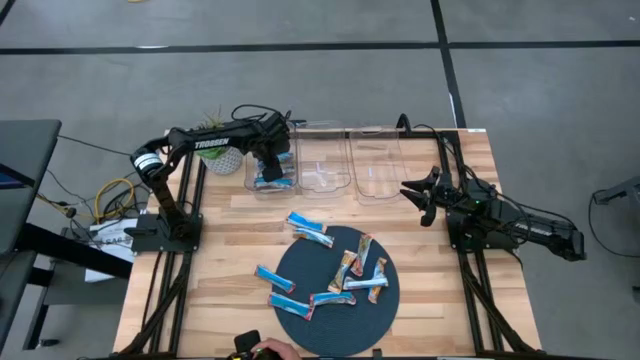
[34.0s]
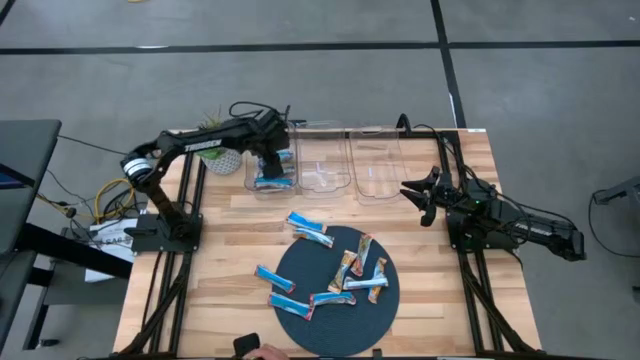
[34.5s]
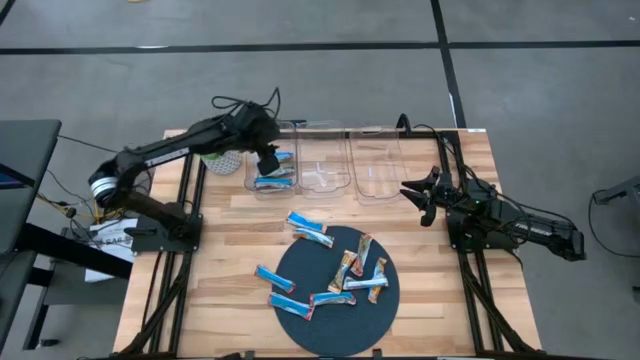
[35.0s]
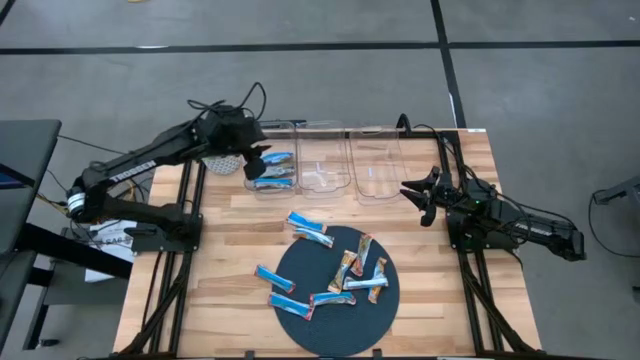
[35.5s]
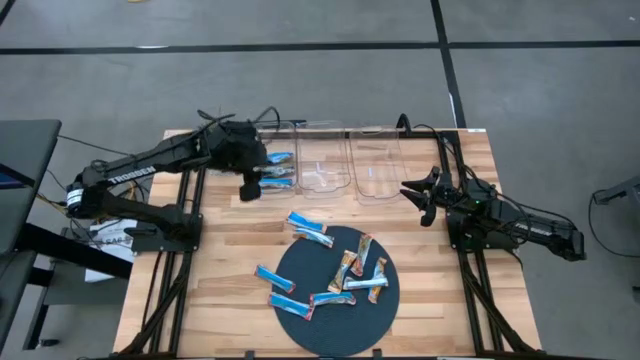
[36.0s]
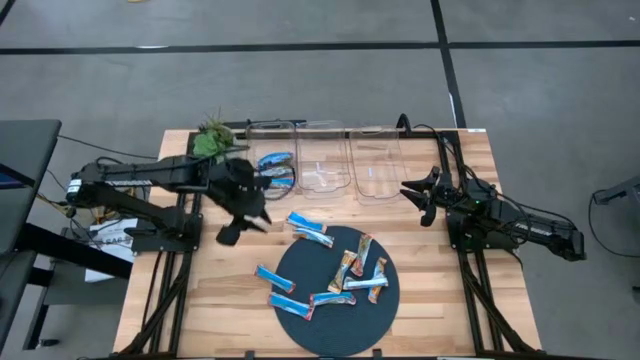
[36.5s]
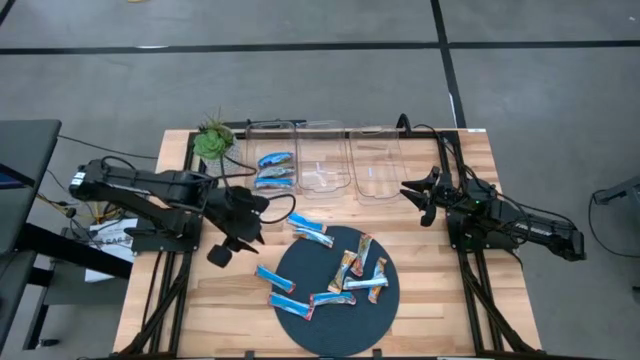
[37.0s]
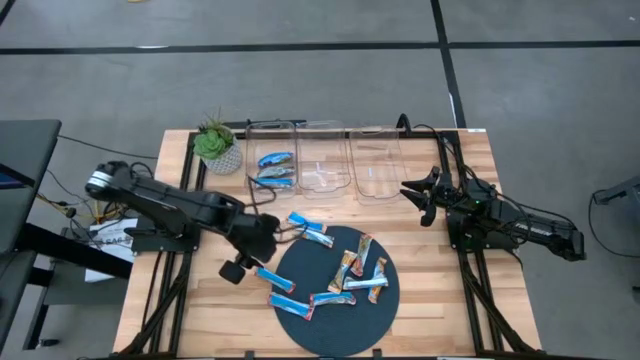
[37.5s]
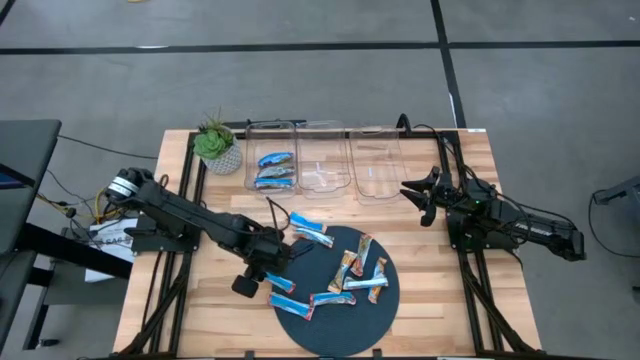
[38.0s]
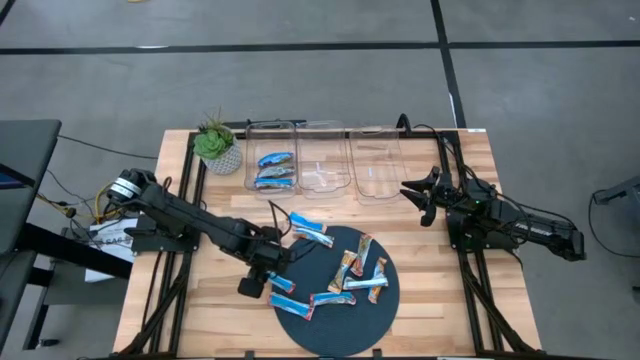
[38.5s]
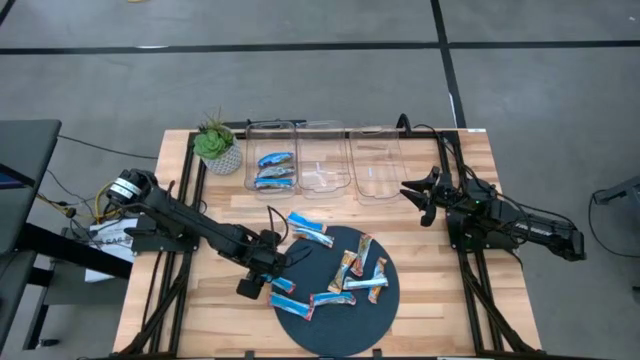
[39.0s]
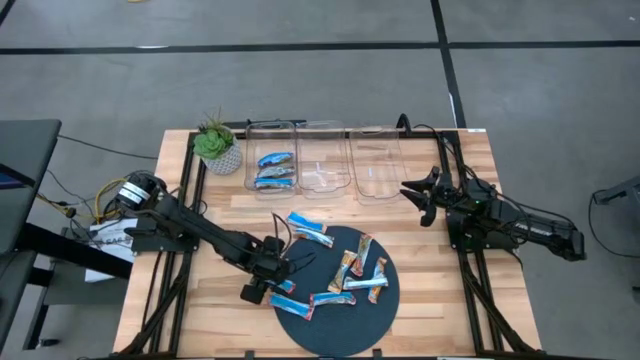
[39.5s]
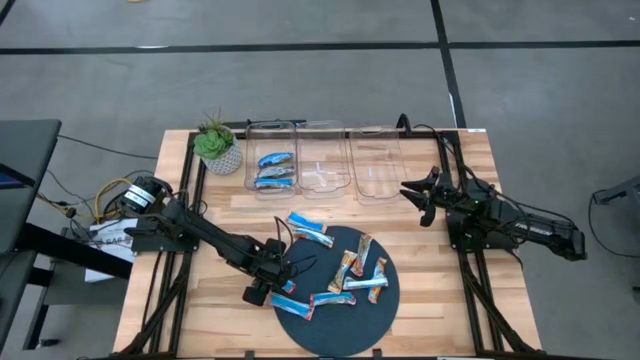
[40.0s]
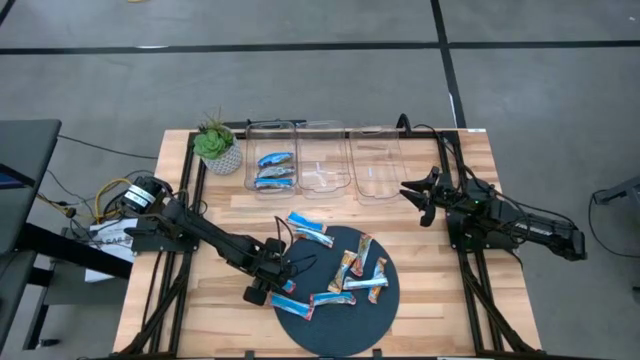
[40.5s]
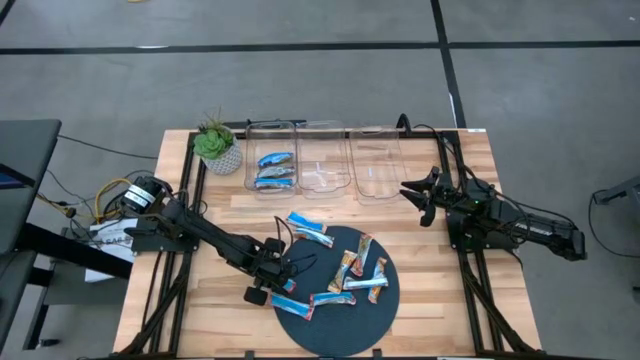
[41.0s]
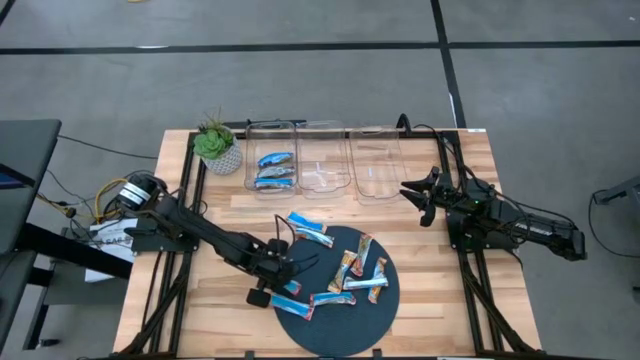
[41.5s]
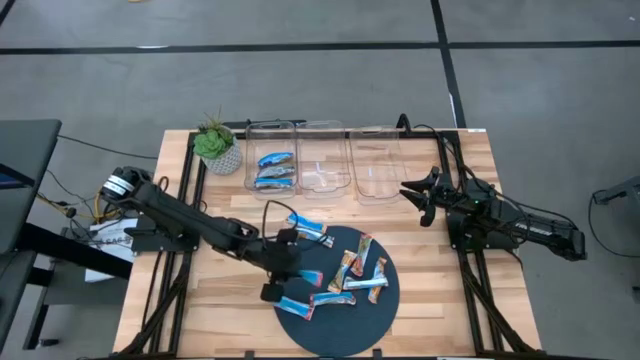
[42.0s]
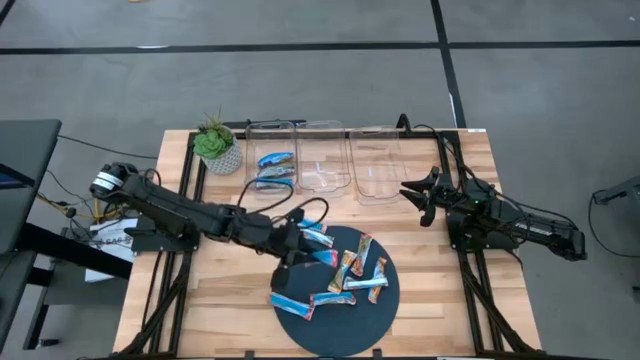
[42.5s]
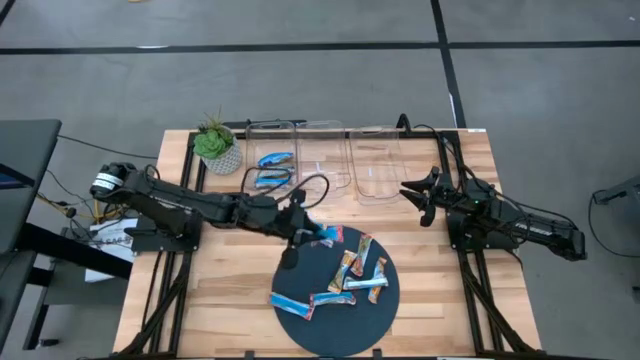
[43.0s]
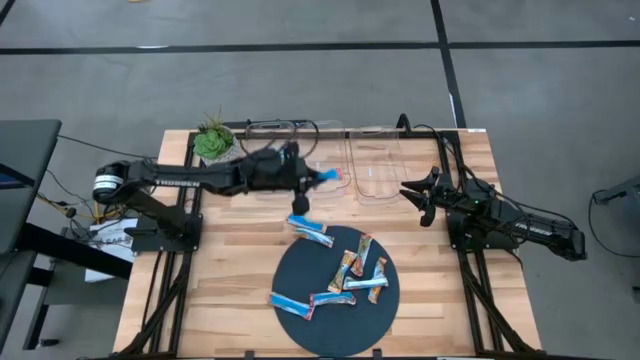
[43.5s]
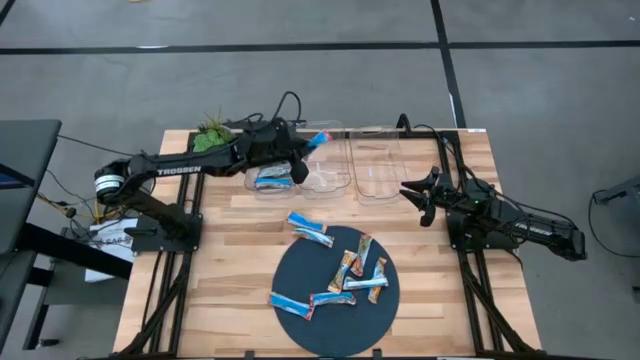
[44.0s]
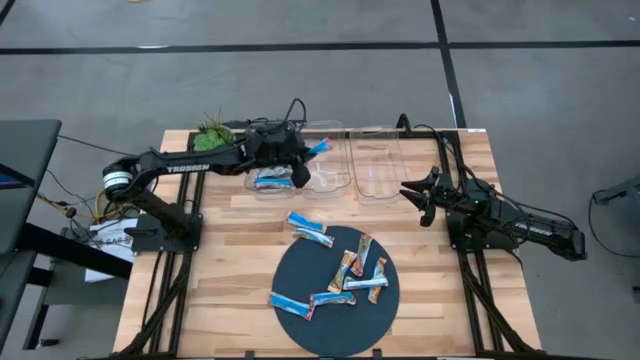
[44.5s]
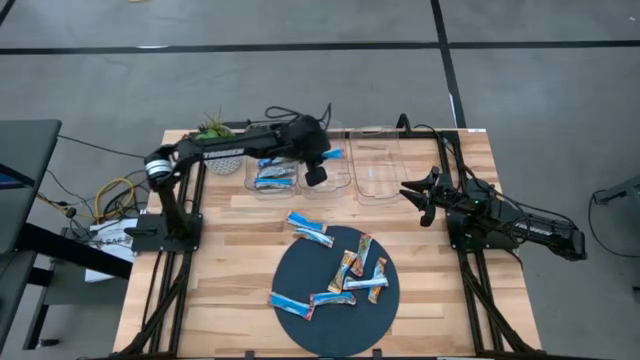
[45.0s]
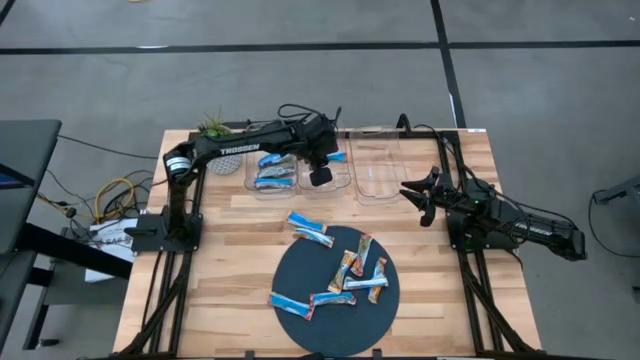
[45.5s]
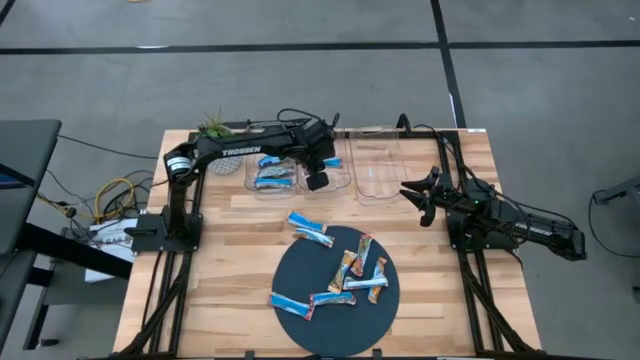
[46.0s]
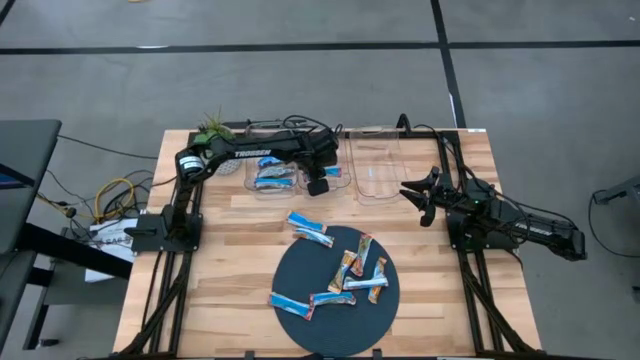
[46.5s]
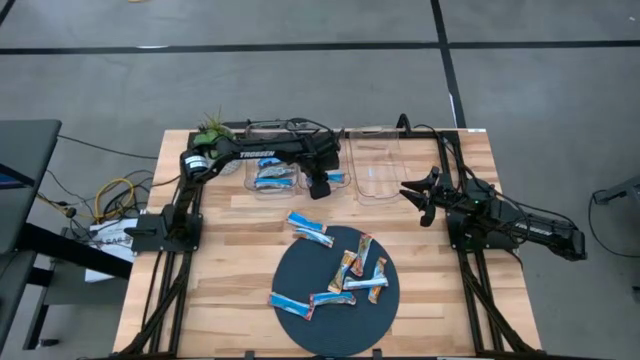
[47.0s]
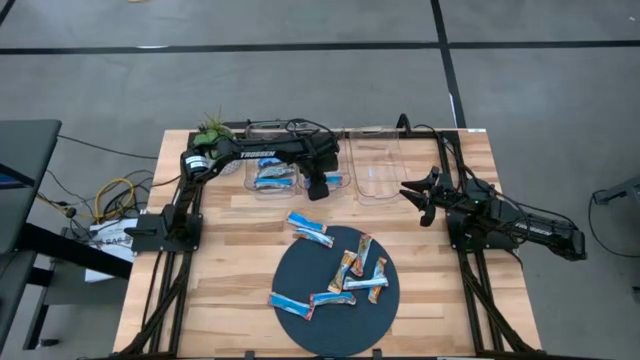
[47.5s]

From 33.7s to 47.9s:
Task: Pick and place Granola Bars by type
Put the red granola bar into the middle transparent bin

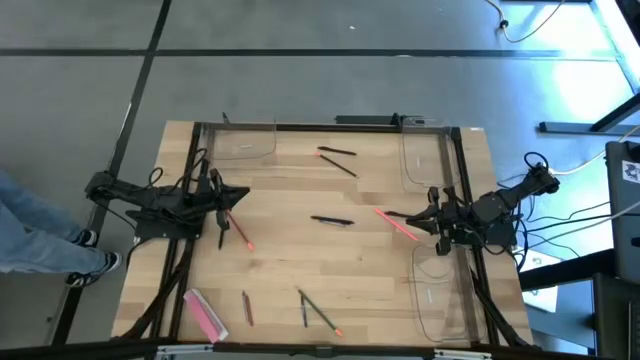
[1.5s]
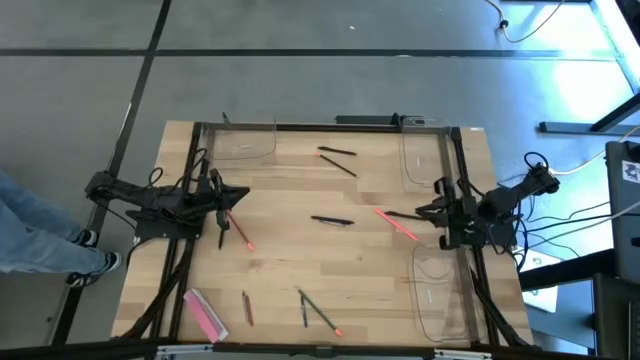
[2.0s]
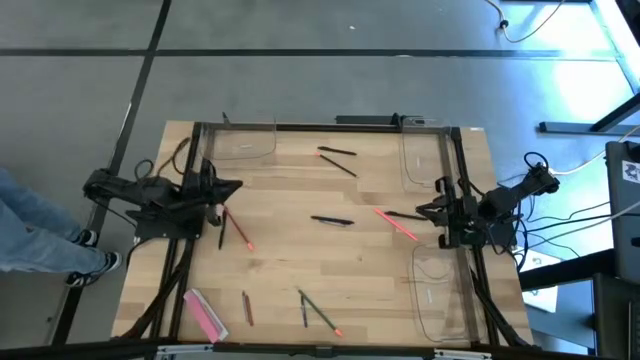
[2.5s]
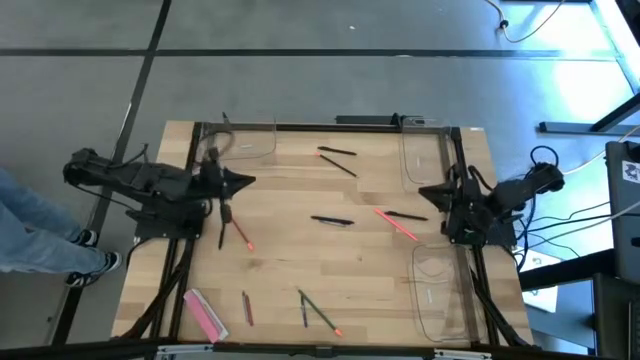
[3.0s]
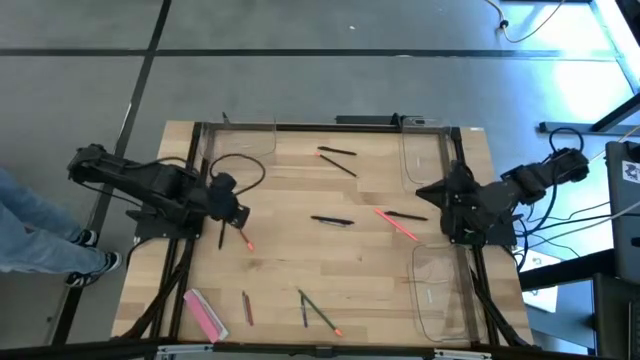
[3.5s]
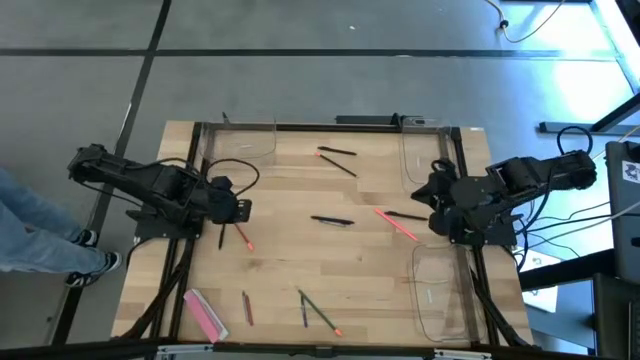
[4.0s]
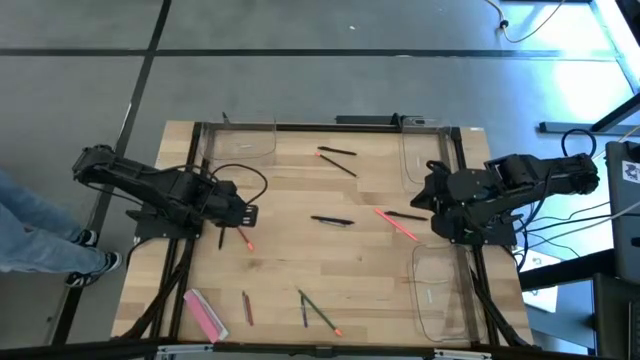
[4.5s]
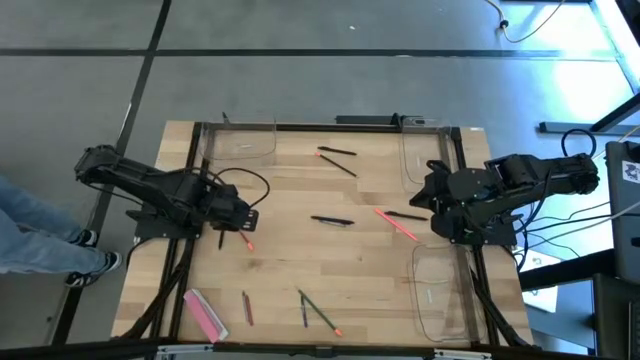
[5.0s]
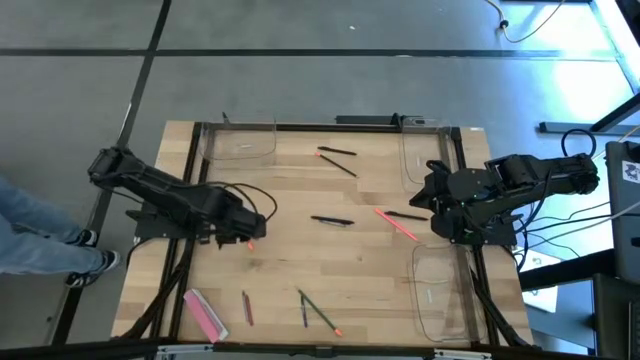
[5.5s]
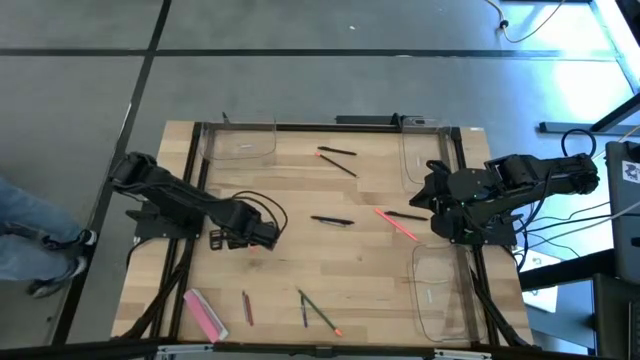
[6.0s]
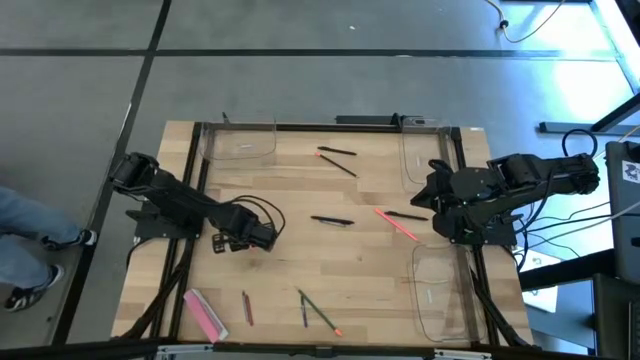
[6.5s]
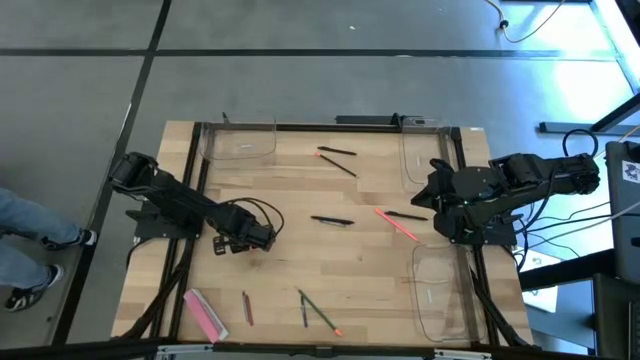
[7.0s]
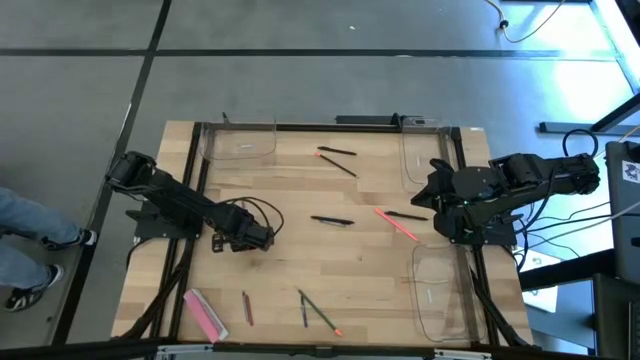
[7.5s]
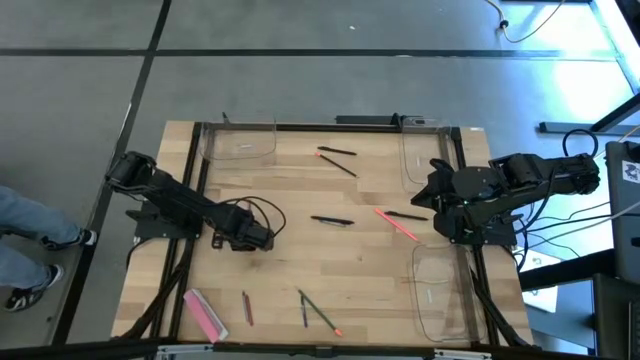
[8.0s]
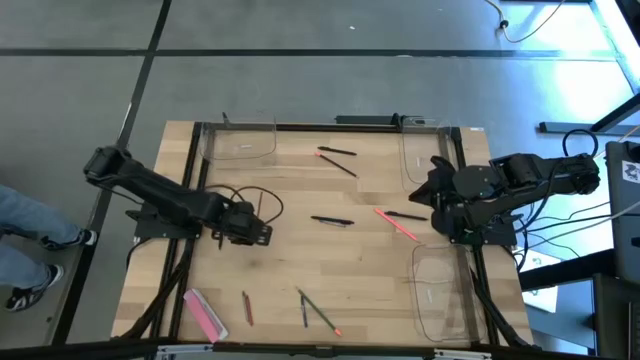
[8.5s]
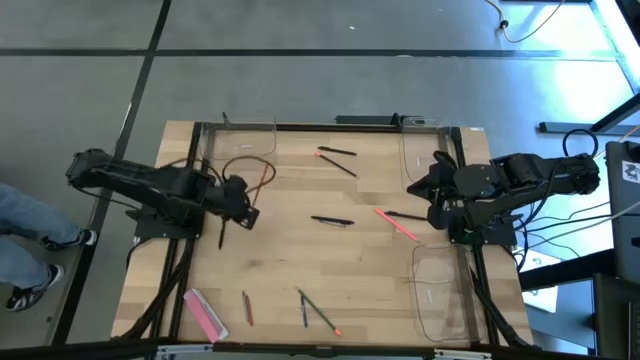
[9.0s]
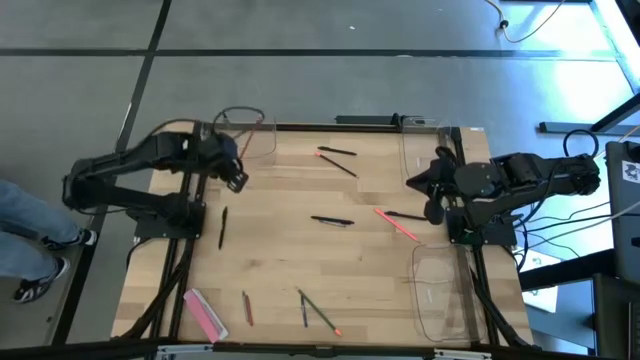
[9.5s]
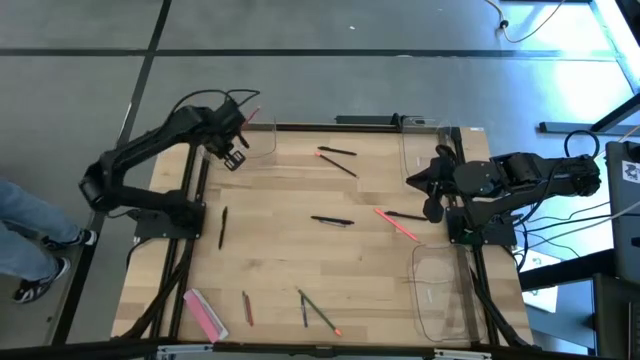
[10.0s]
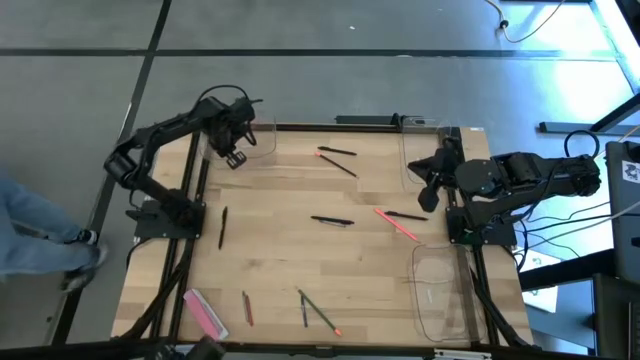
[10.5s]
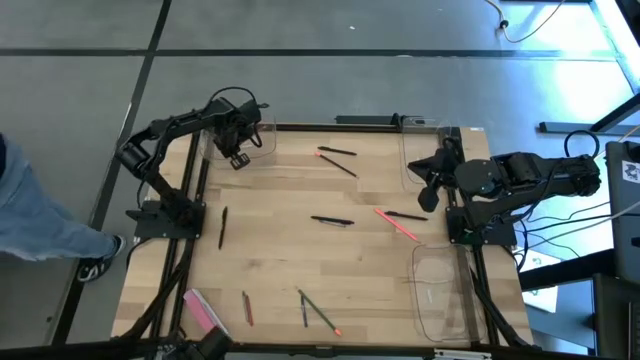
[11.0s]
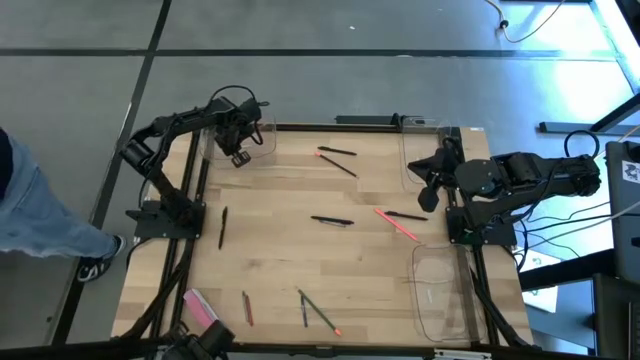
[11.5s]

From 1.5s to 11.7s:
Task: Sort crayons/erasers/pens/pencils in bins
Put the red pencil into the top left transparent bin
